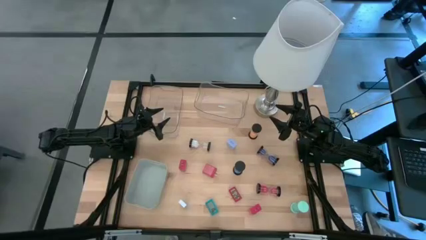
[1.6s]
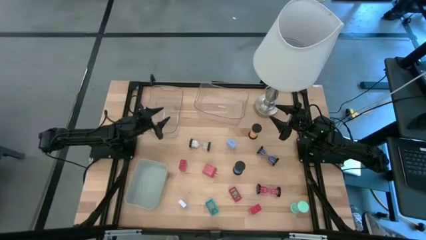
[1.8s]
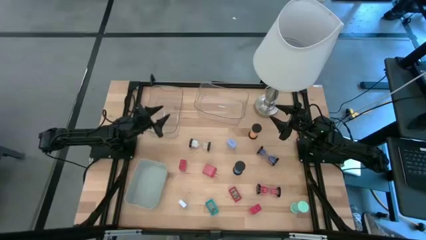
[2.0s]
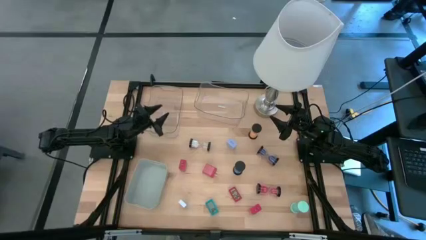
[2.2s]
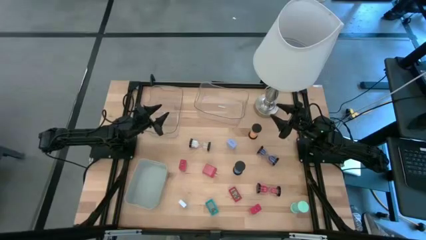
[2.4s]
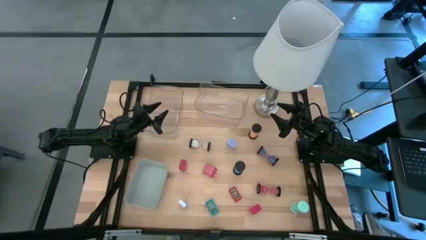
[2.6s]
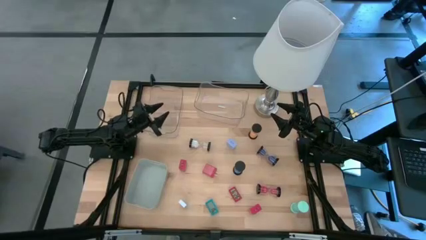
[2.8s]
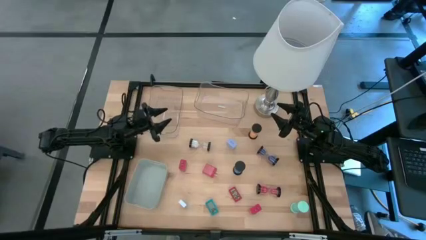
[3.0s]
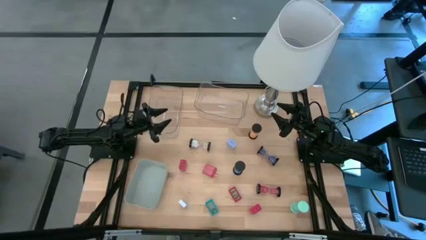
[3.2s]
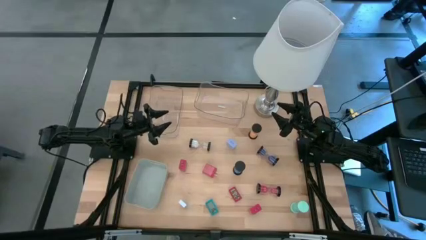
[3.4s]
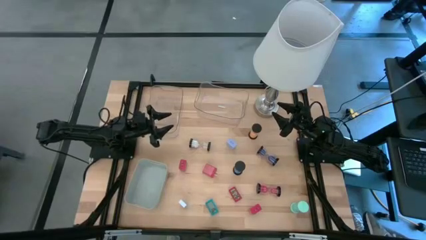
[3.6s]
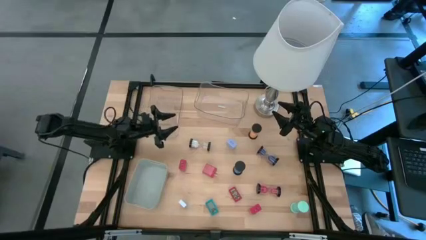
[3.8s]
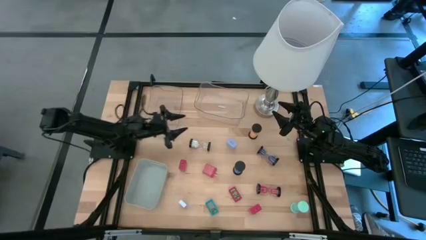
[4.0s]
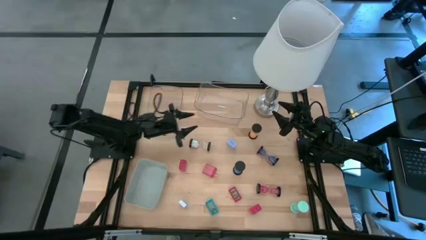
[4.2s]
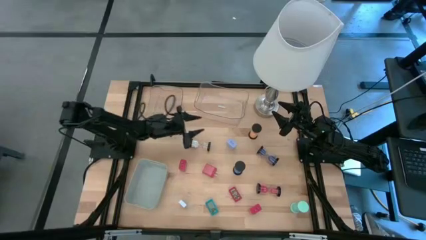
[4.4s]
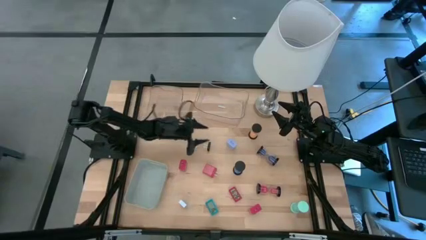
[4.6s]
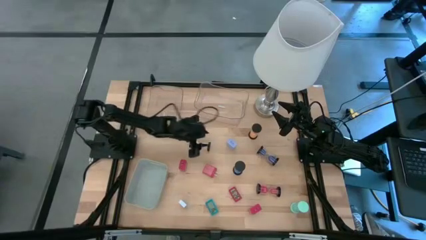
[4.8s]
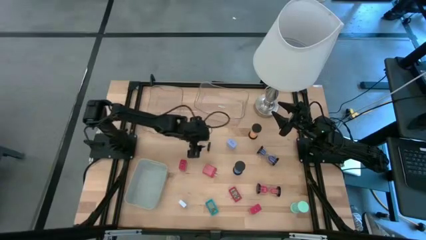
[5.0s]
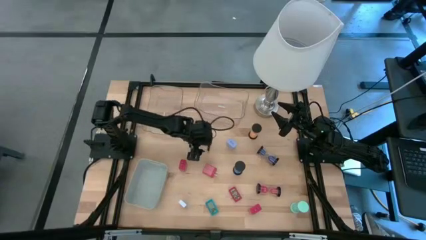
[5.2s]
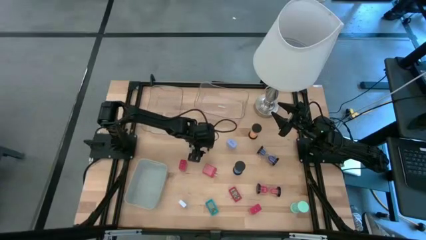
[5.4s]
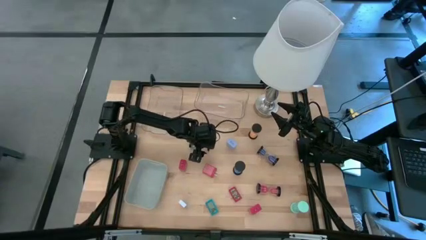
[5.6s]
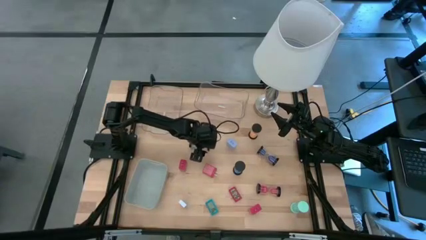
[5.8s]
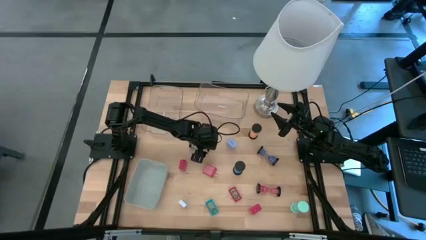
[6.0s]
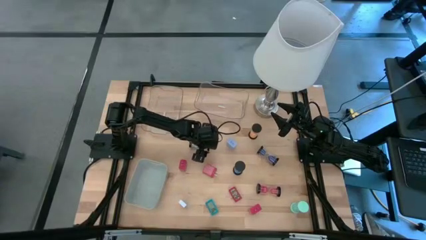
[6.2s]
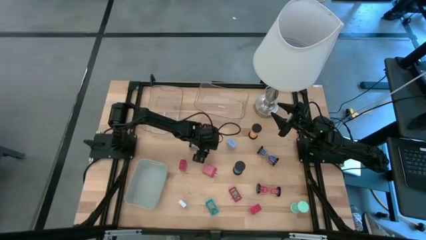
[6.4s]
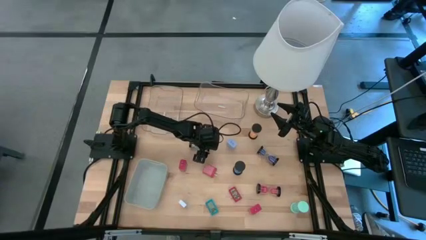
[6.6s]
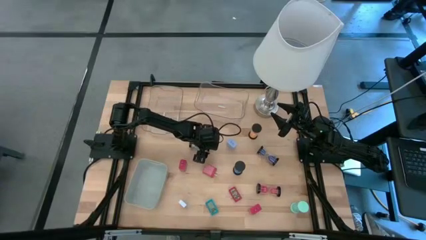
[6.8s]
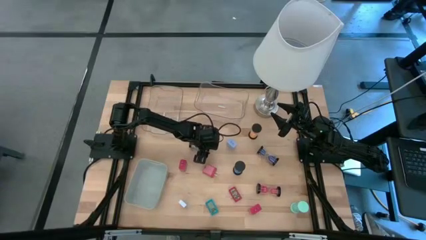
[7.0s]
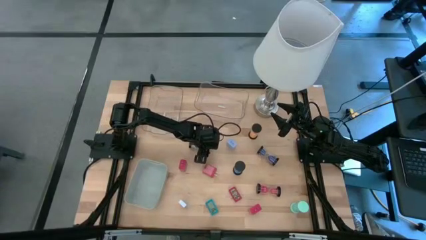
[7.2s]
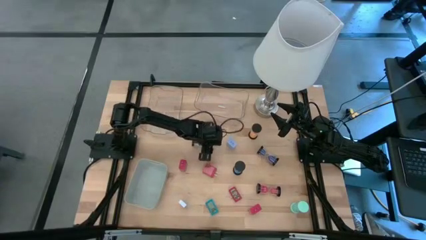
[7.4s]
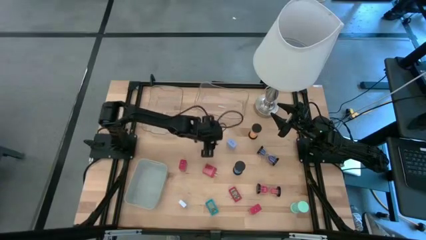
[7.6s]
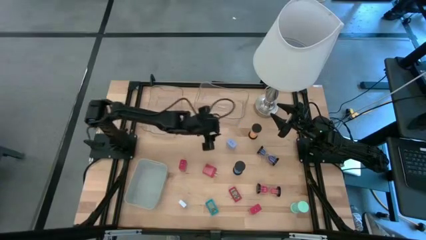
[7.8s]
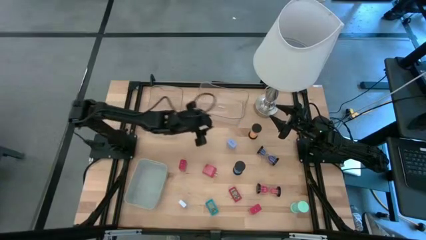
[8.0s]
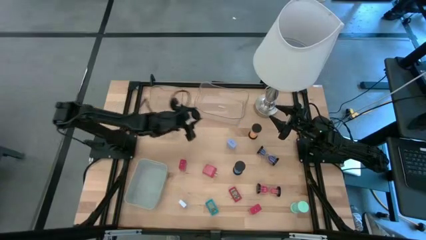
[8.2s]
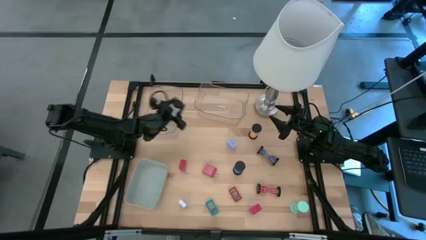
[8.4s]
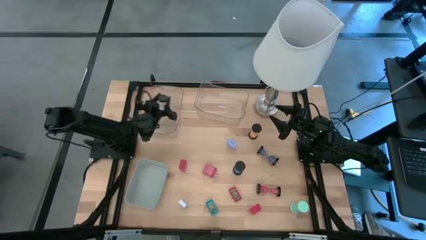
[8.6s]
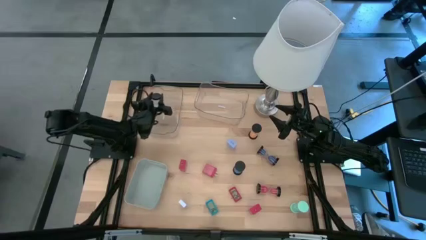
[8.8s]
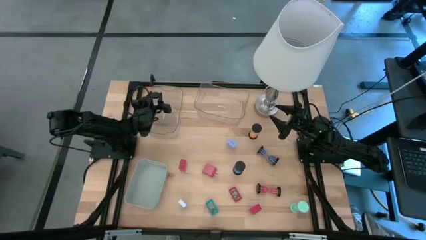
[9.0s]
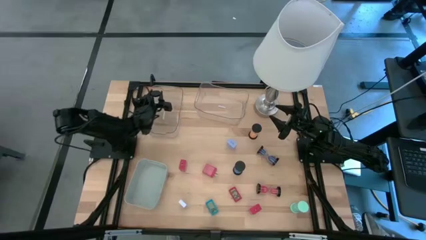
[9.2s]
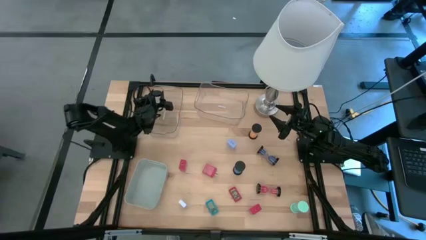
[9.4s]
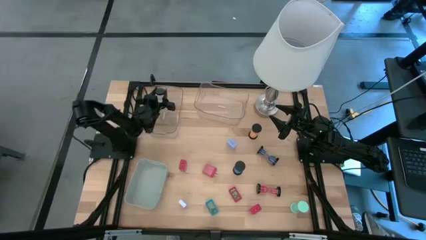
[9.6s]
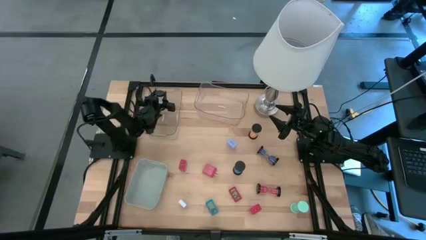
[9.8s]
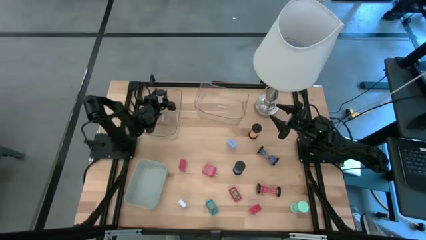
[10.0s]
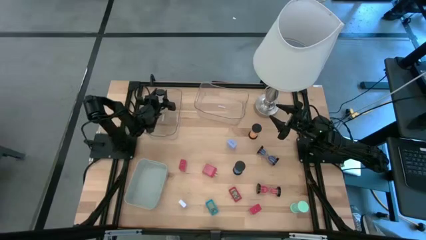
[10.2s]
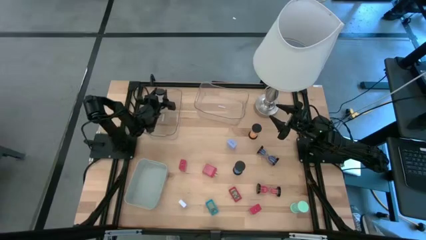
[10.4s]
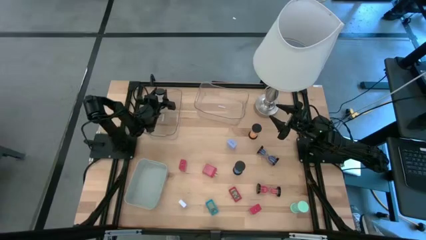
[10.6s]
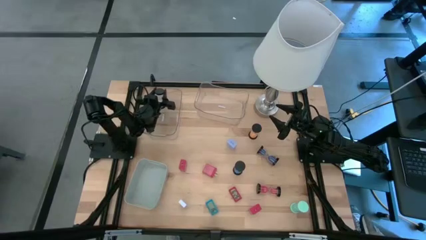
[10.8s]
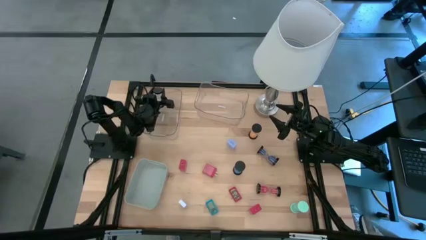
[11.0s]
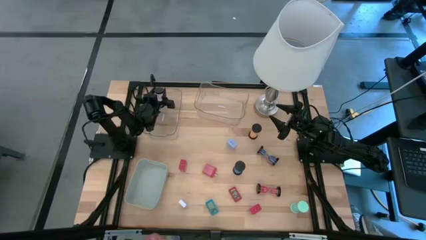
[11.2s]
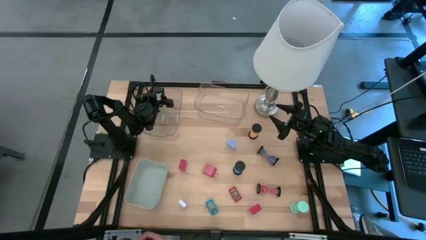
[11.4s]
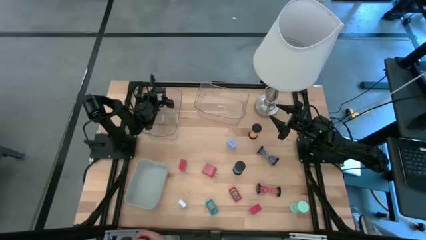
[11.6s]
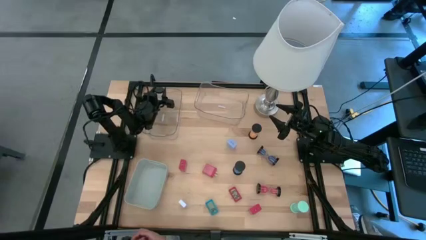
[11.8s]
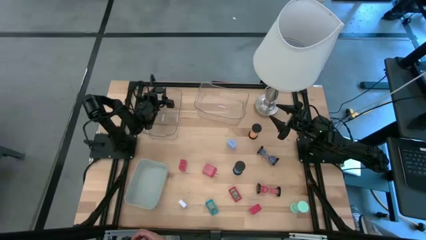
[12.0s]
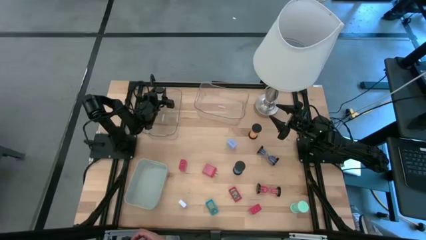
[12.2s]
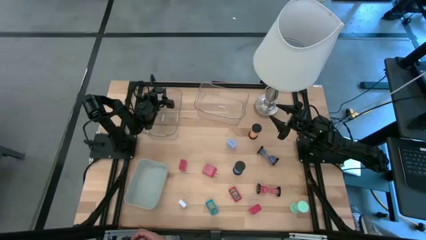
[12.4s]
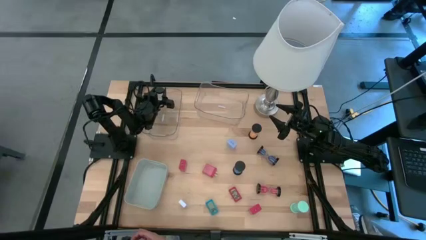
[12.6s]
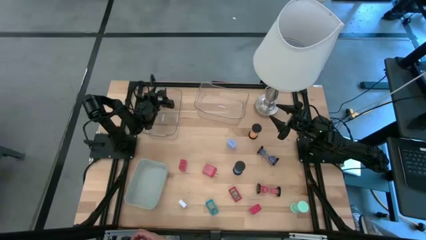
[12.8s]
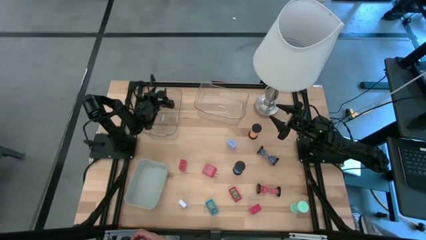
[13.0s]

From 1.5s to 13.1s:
Task: Pick & Place Office items
Put the white hourglass into the left transparent bin

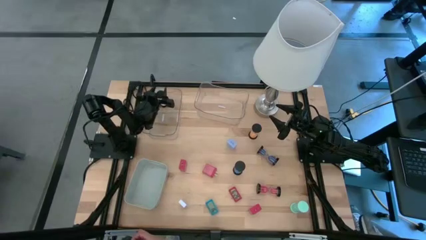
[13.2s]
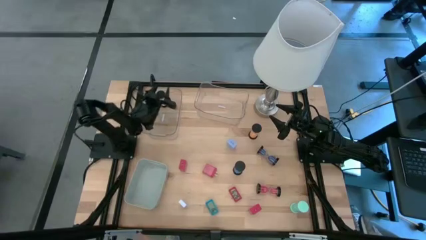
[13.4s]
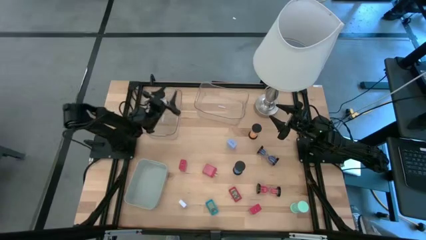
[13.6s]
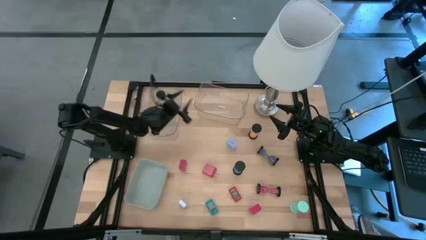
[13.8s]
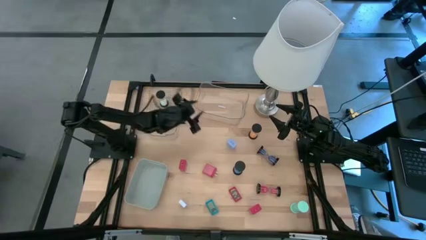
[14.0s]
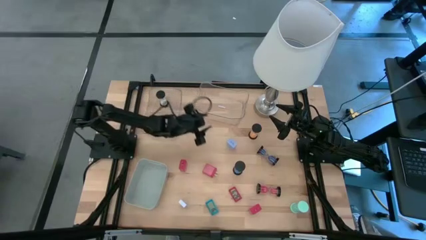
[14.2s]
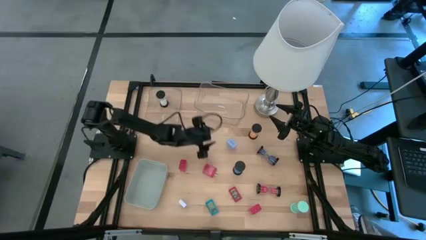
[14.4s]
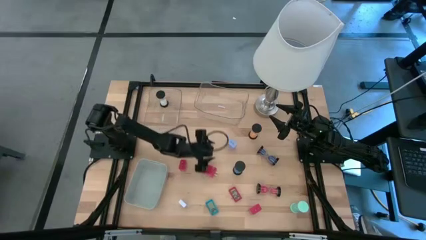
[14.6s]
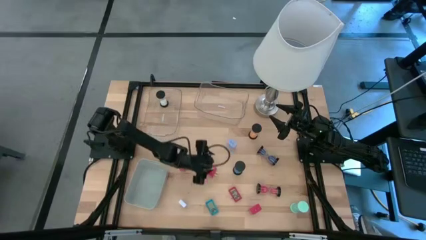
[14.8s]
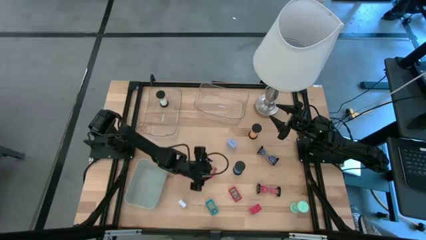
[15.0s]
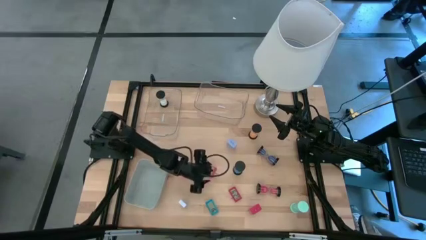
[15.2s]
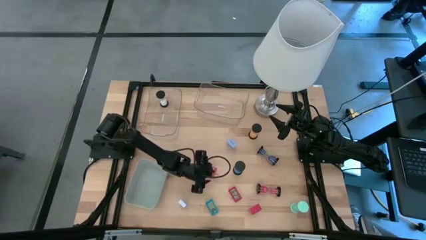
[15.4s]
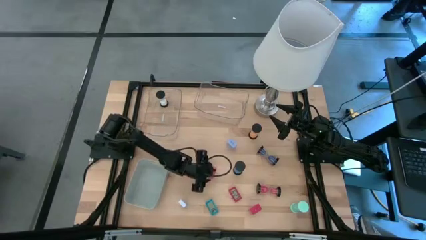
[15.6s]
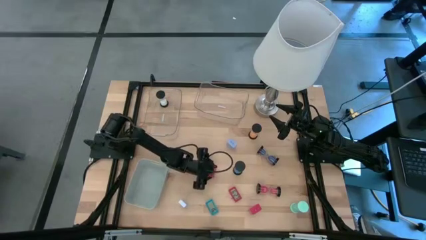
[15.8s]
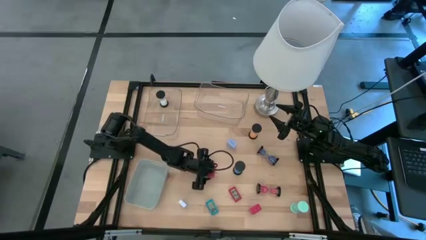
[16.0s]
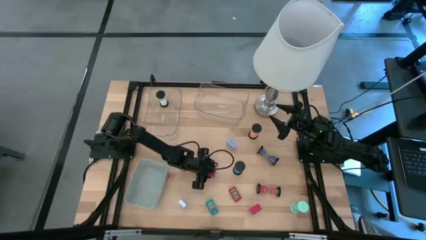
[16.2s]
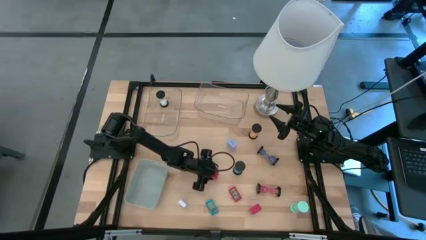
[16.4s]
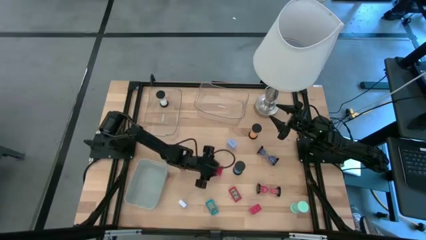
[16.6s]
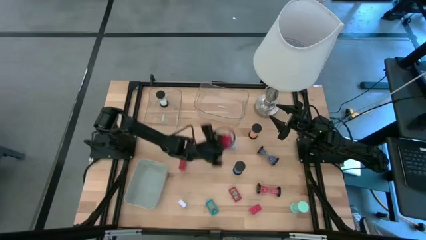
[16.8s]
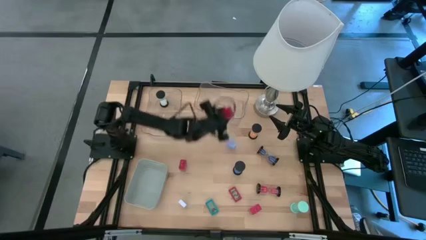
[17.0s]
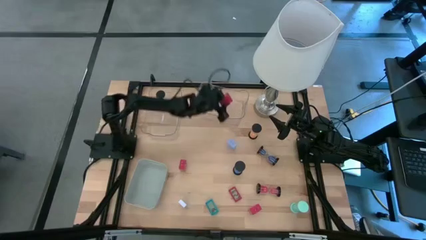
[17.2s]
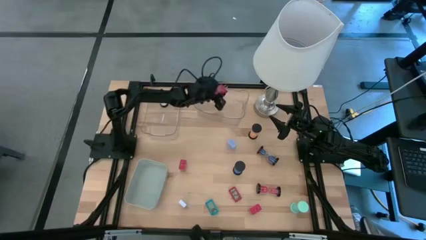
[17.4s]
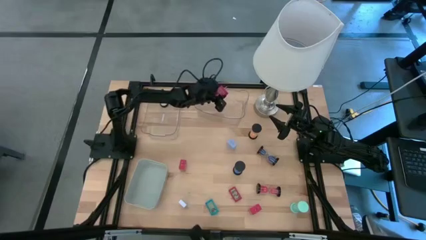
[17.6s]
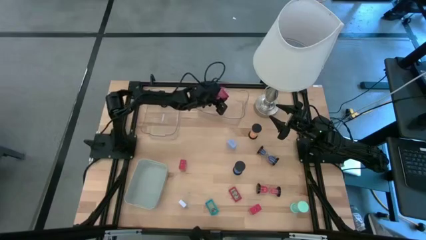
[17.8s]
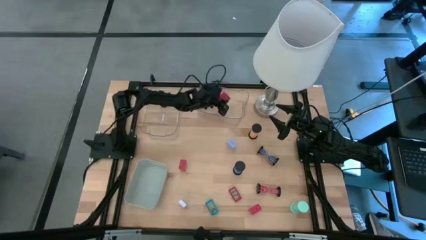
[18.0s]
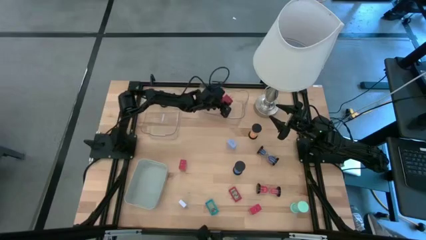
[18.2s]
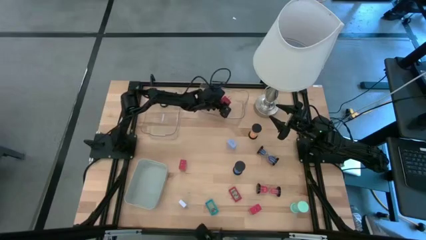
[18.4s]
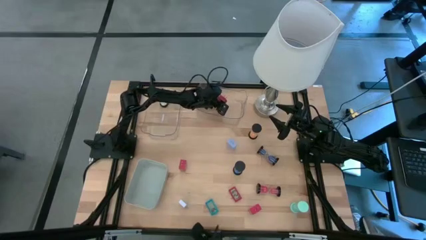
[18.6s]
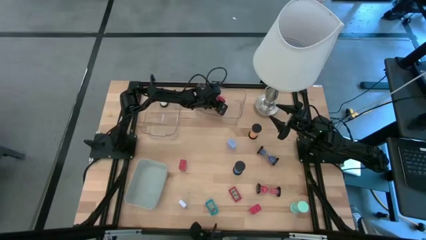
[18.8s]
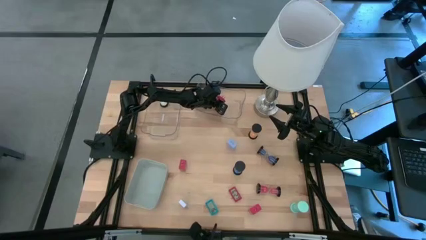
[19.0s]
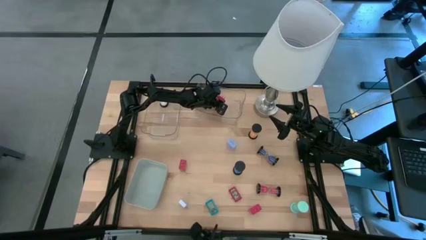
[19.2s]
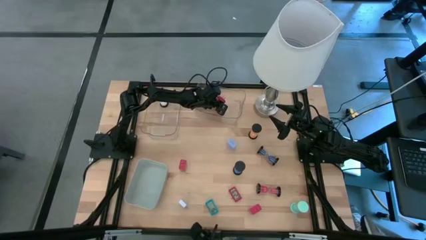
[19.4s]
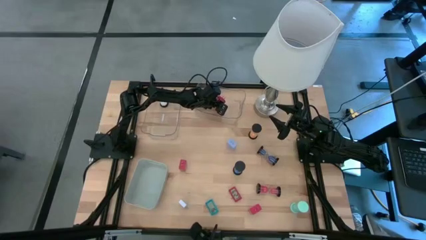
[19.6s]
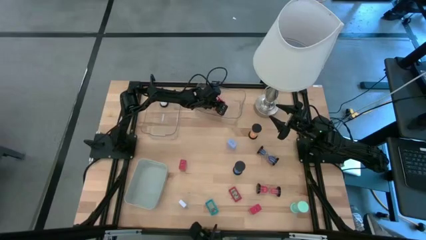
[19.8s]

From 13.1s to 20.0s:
Put the center red charger adapter into the right transparent bin
